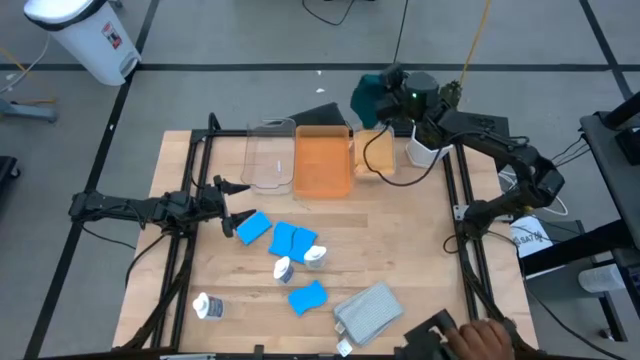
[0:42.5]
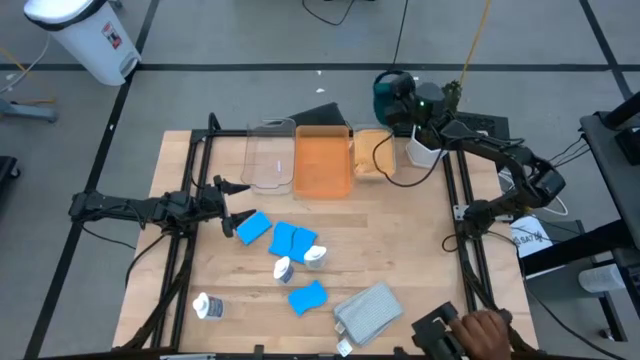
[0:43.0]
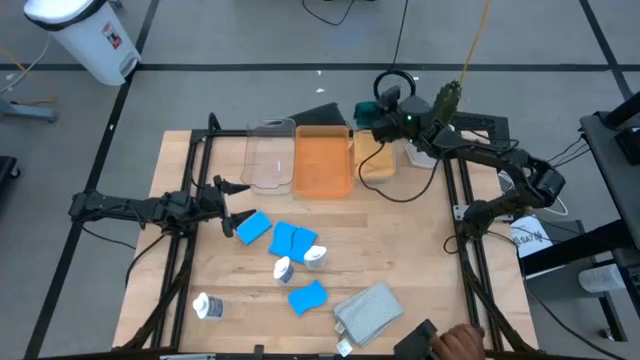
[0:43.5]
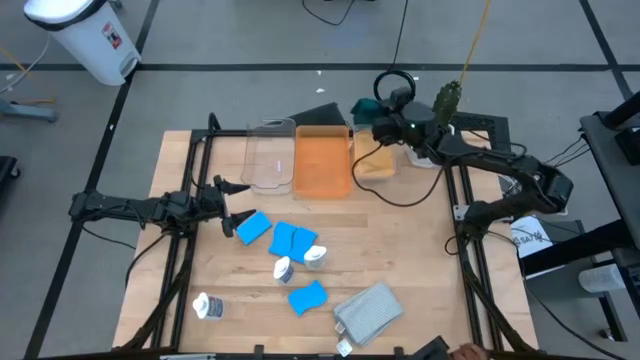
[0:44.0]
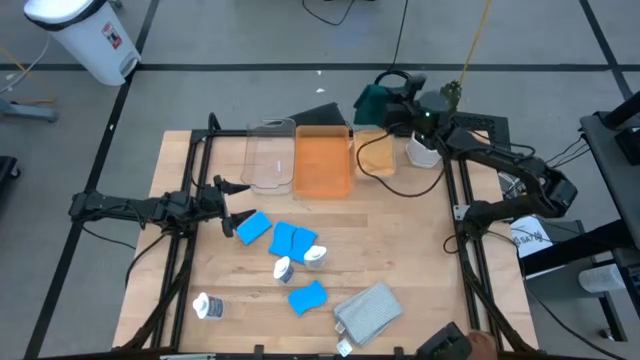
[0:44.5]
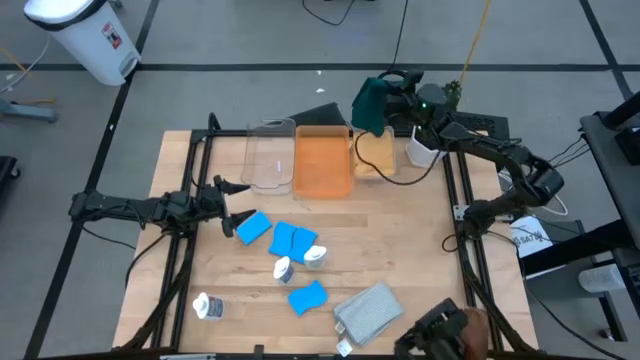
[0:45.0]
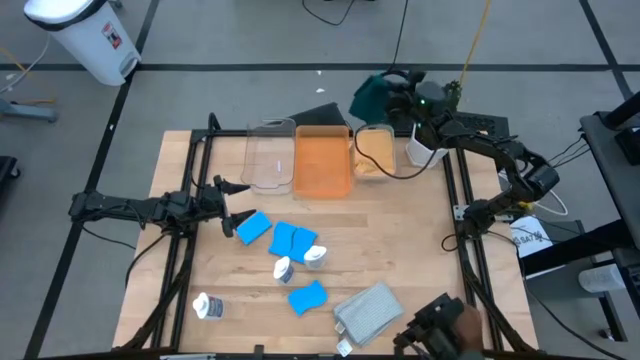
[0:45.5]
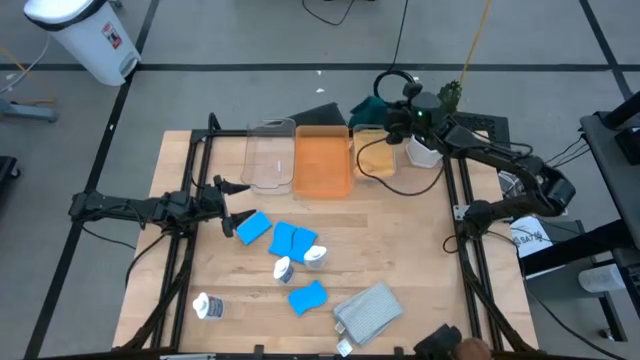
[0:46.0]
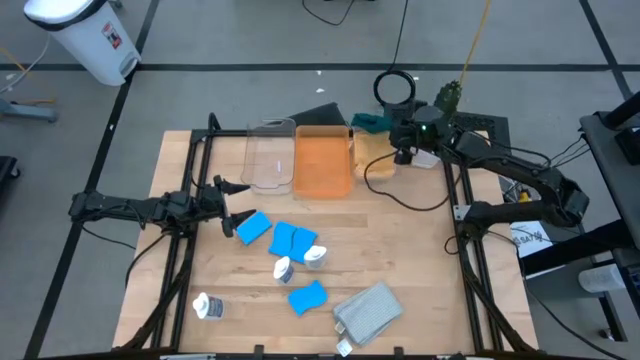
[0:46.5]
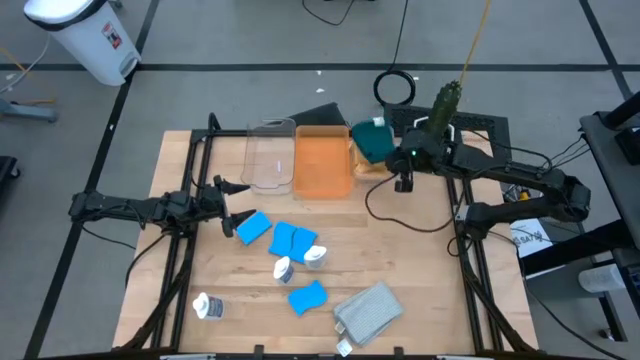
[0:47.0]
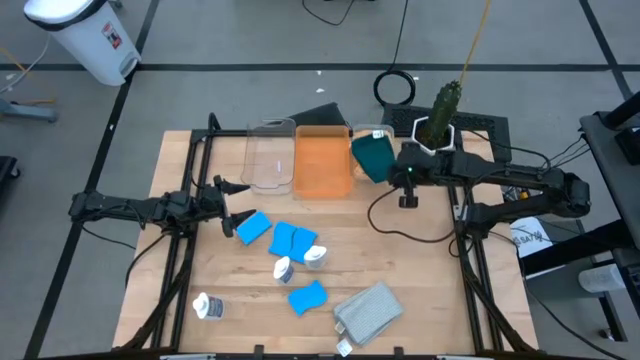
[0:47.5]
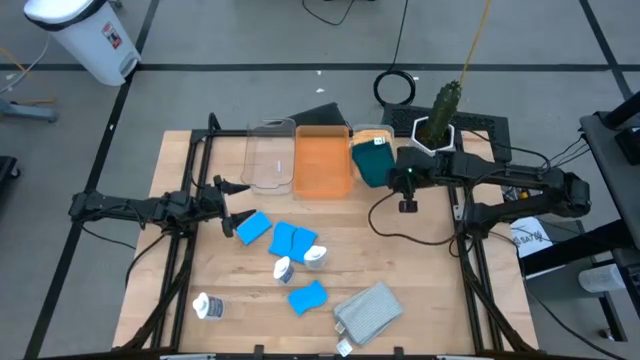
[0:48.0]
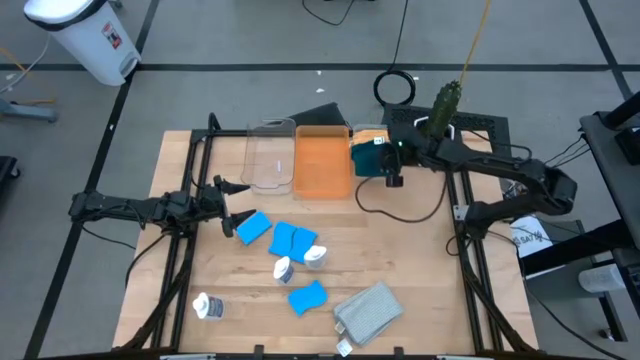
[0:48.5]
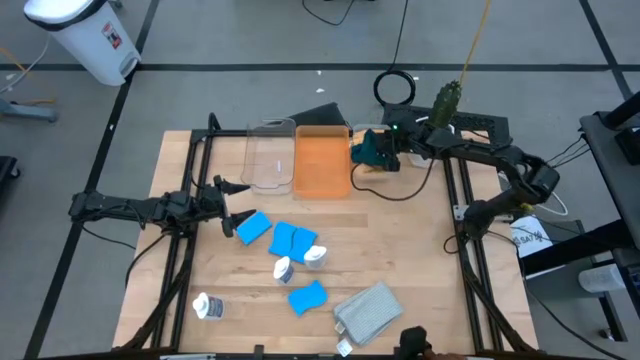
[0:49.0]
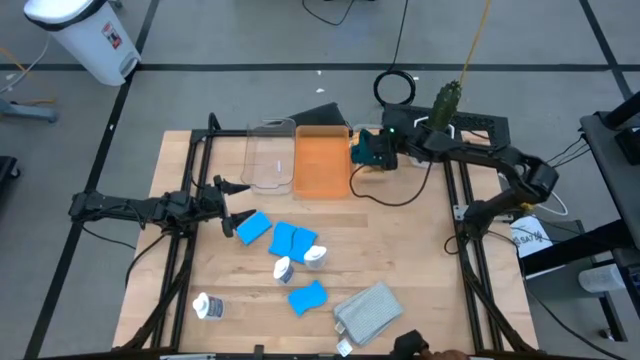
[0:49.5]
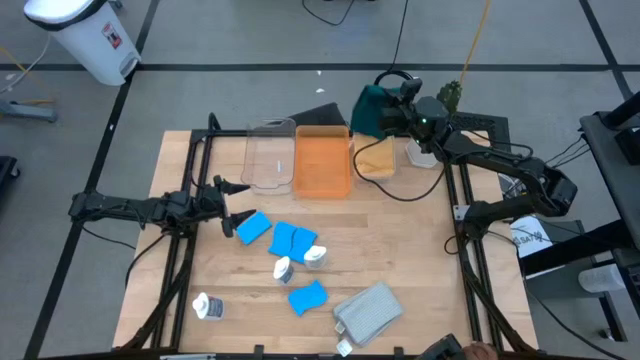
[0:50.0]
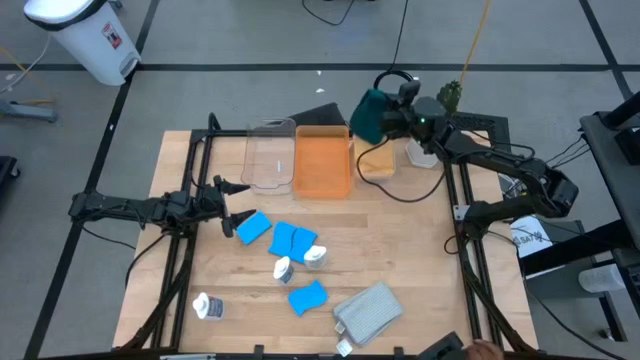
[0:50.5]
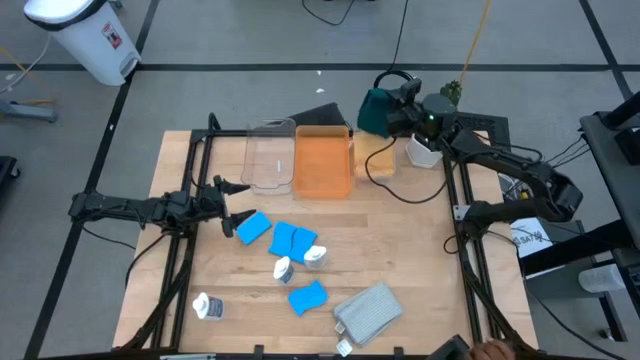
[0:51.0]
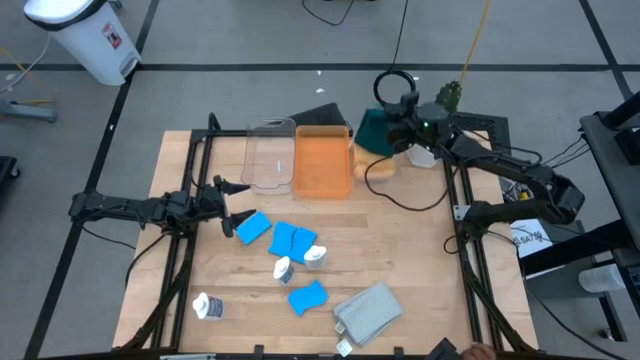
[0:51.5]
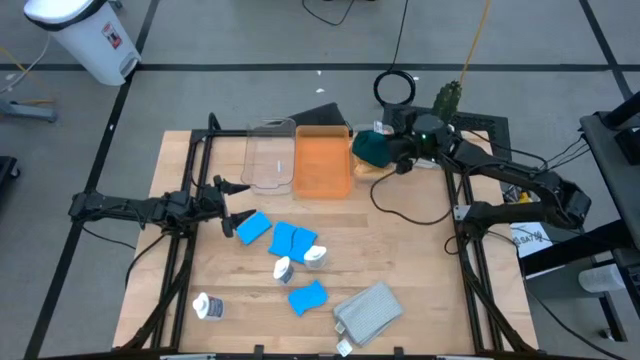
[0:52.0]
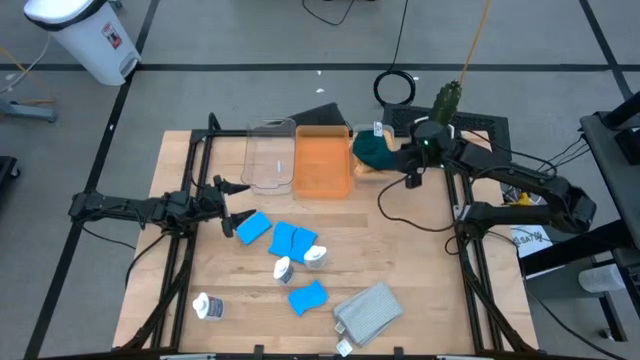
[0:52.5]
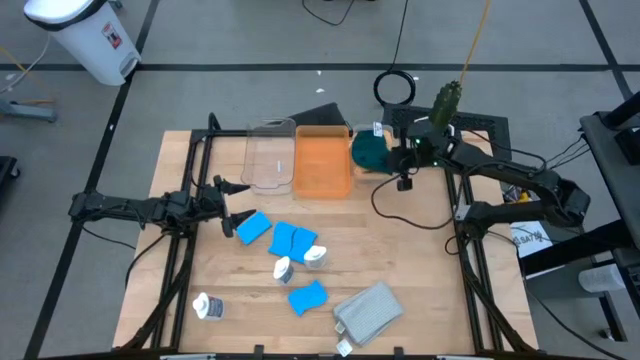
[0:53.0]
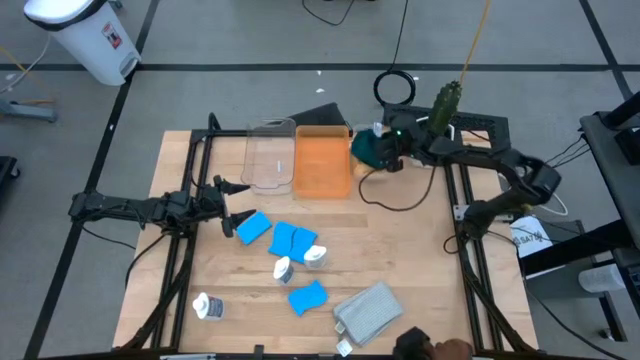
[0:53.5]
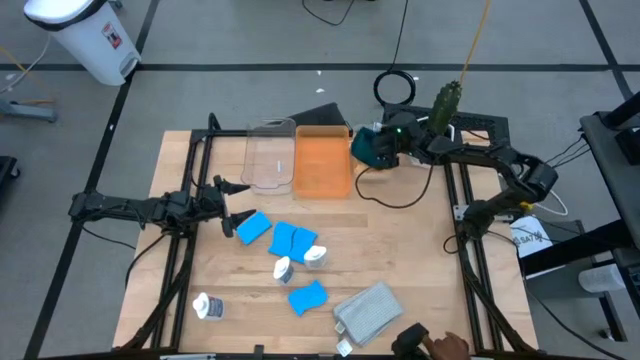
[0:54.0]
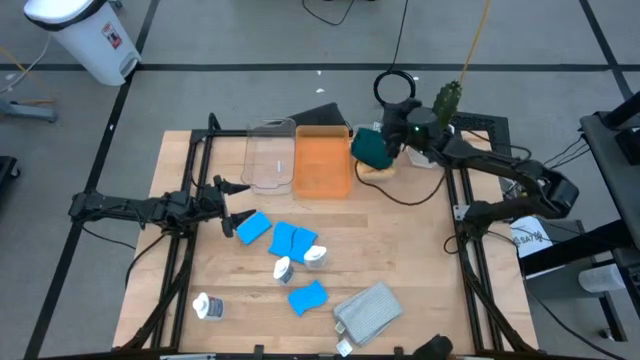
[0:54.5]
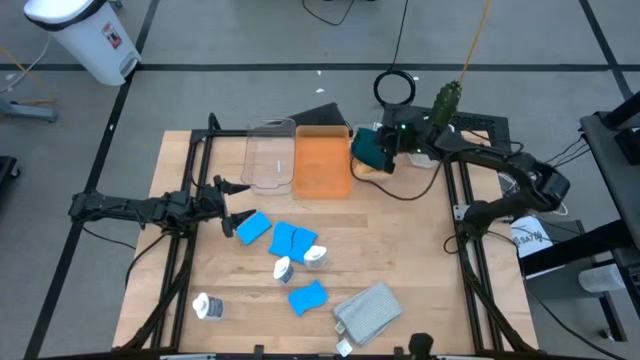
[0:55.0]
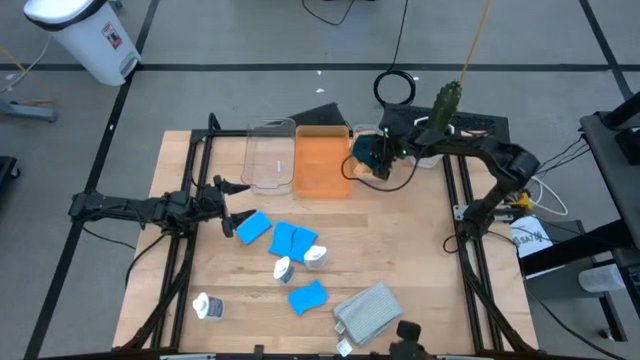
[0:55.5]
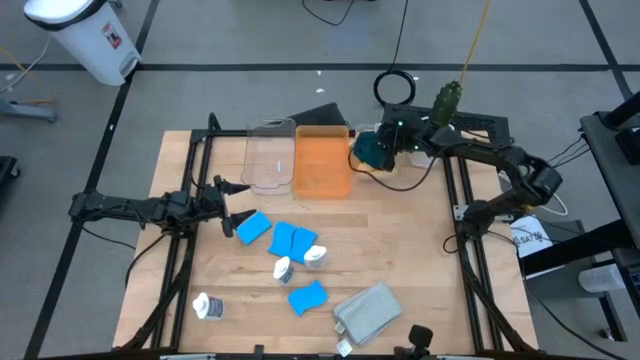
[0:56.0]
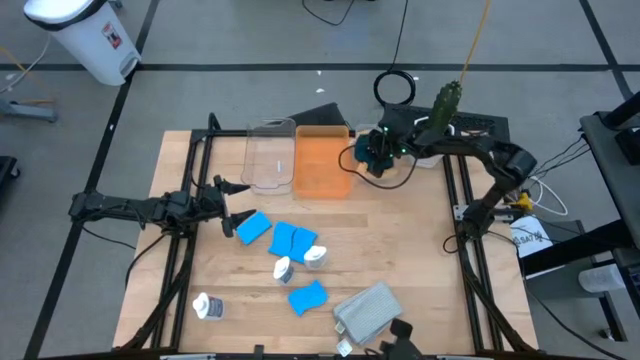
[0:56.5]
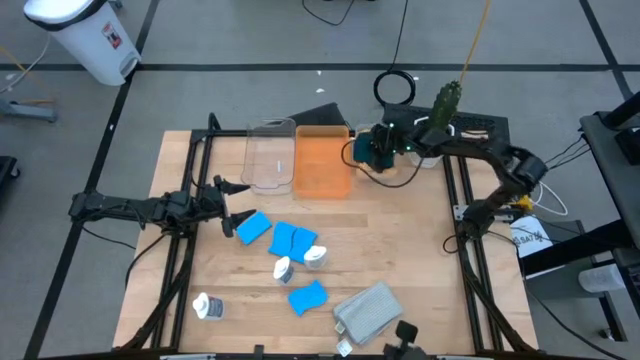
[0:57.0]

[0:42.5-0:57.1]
Task: Pick & Place Kitchen Items
Put the blue microfiber cloth into the white bin

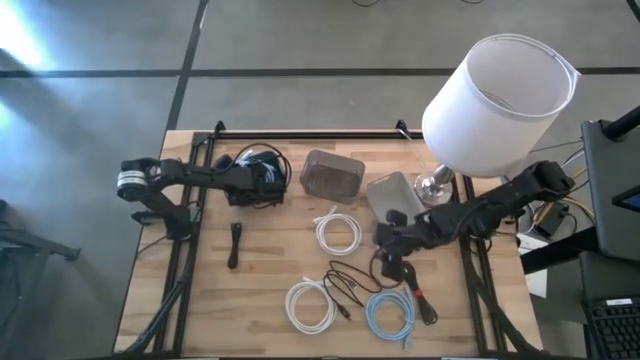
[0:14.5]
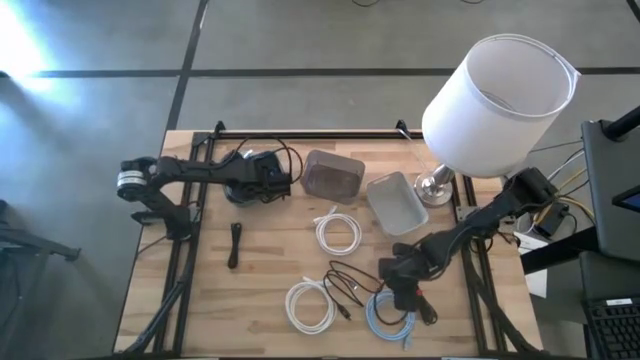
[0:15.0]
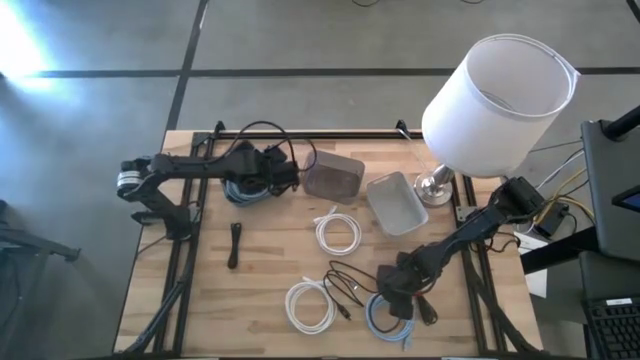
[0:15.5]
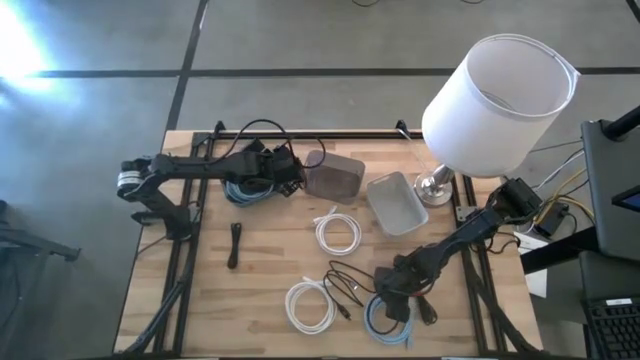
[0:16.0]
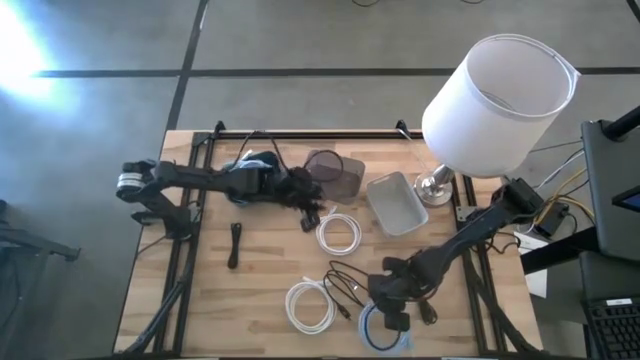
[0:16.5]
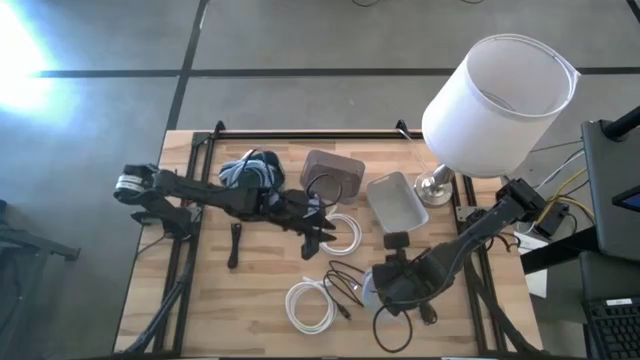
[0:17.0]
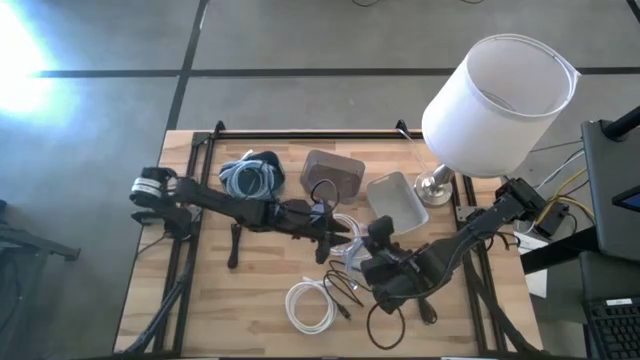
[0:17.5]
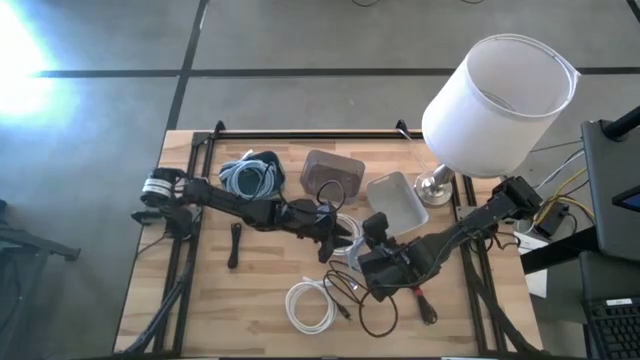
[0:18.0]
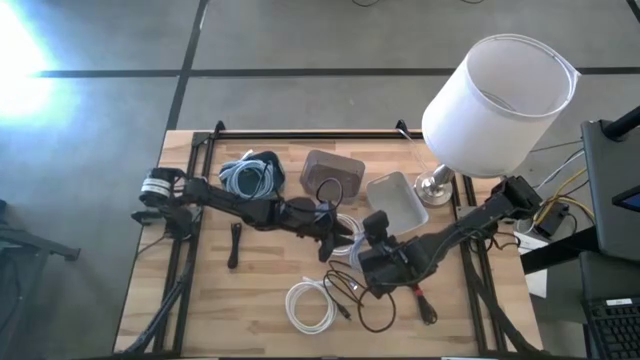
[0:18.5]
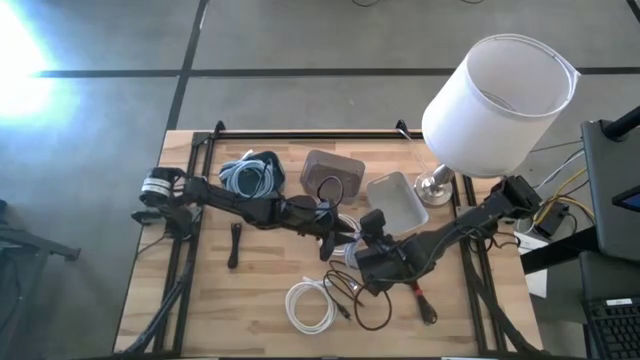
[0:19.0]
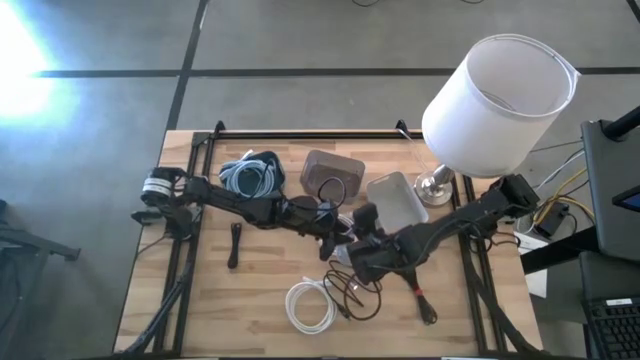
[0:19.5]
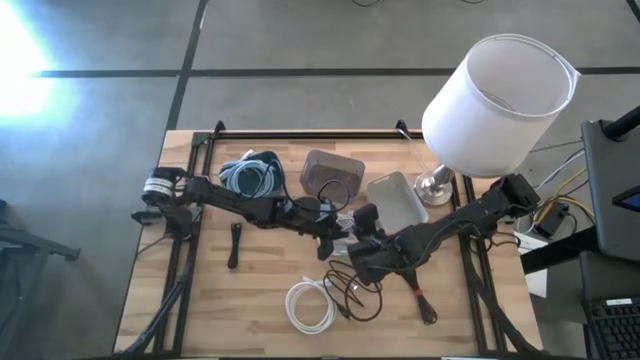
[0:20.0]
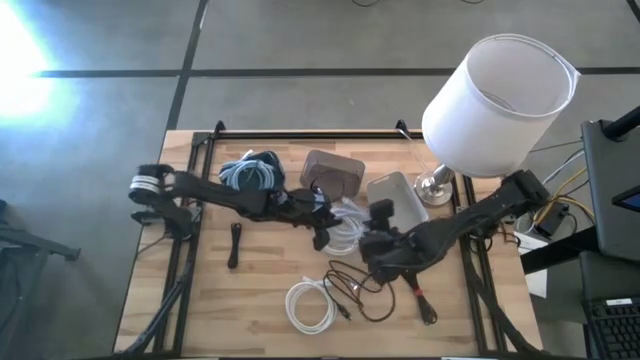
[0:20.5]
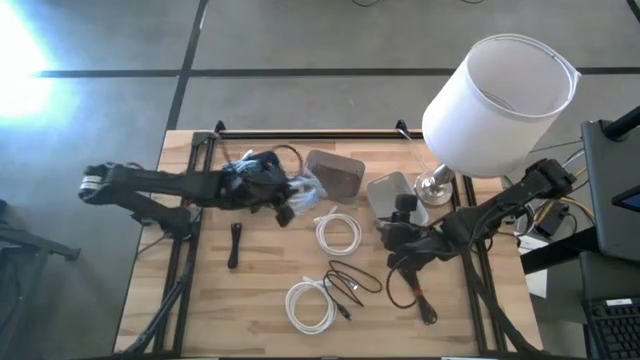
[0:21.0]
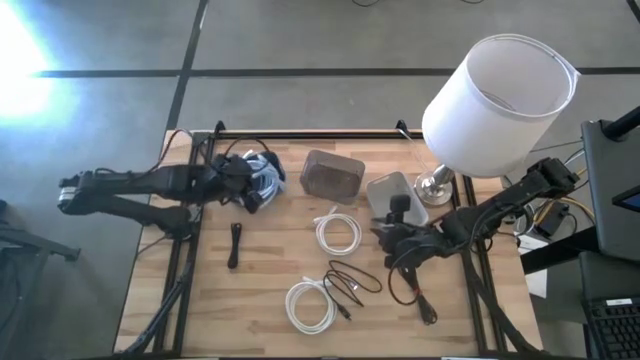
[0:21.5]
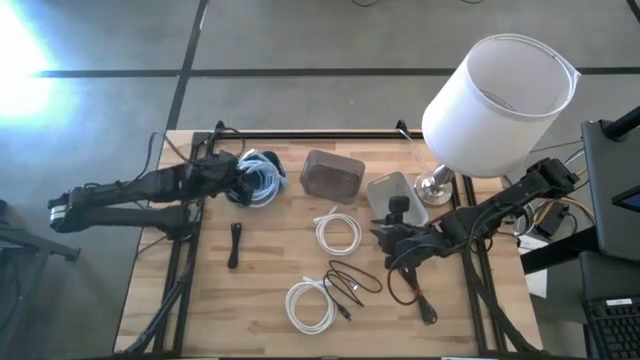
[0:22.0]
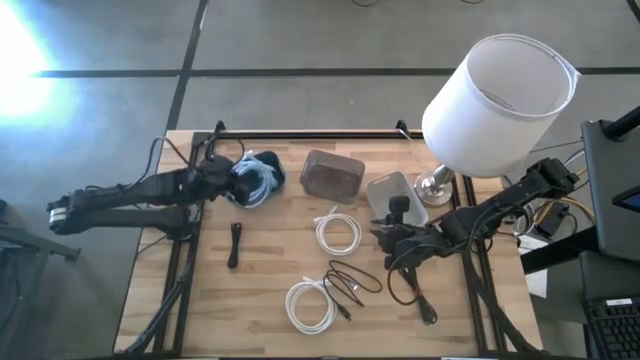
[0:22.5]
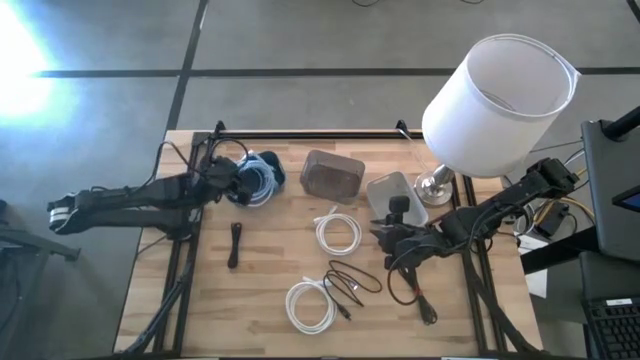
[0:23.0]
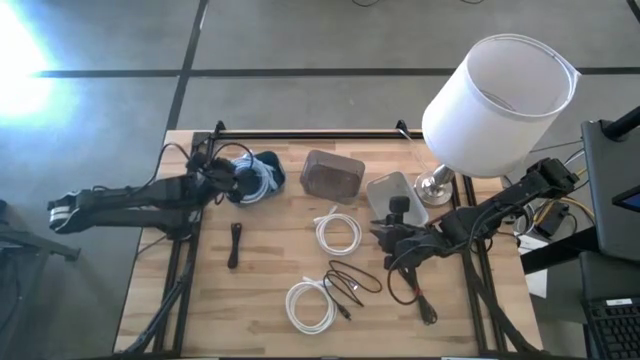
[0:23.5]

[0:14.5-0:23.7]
Task: Pick & Place USB Port
Put the blue HDMI cable into the gray bin
